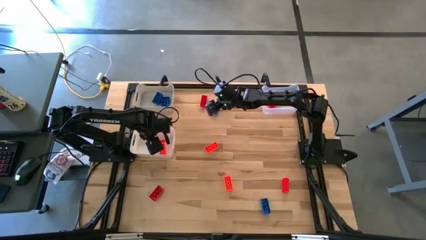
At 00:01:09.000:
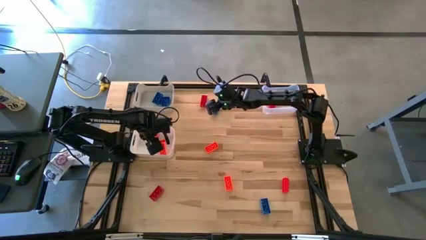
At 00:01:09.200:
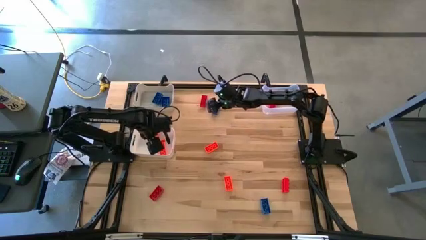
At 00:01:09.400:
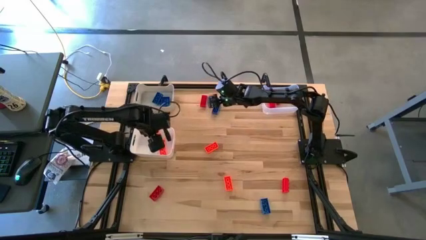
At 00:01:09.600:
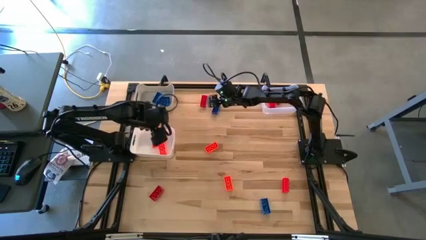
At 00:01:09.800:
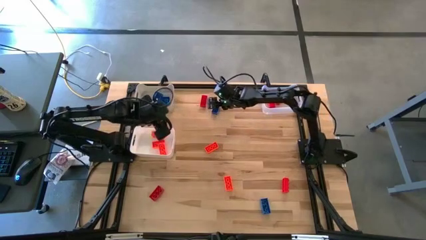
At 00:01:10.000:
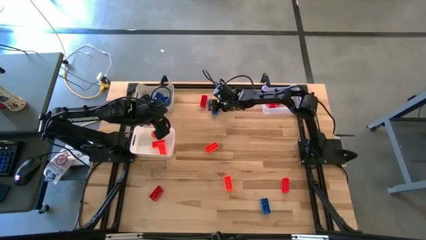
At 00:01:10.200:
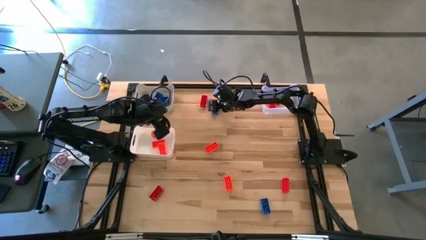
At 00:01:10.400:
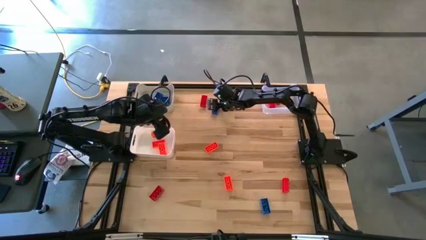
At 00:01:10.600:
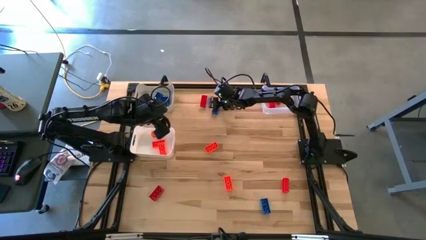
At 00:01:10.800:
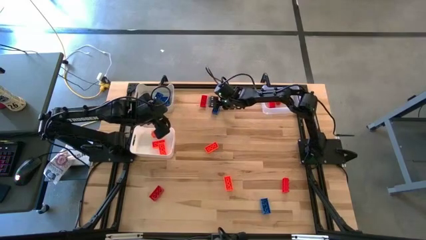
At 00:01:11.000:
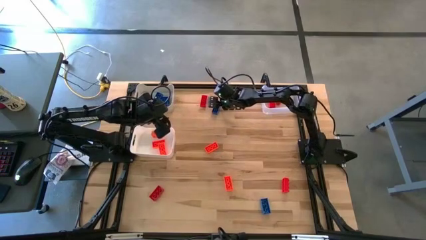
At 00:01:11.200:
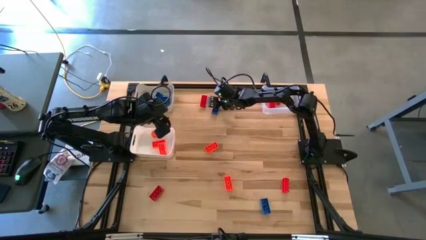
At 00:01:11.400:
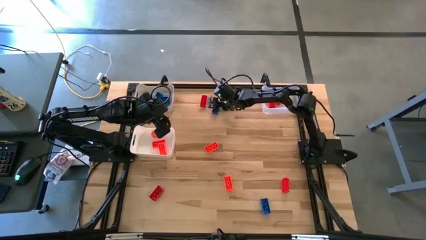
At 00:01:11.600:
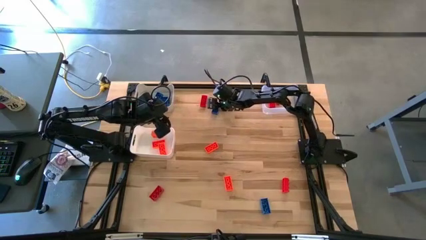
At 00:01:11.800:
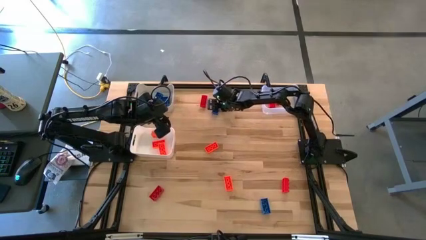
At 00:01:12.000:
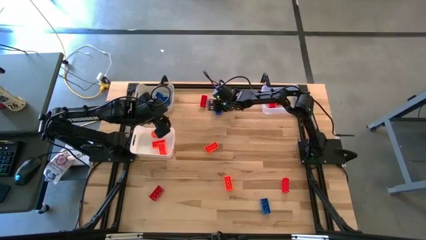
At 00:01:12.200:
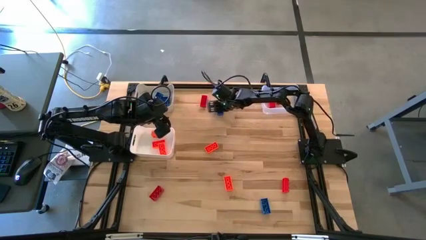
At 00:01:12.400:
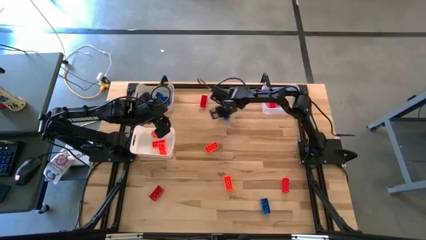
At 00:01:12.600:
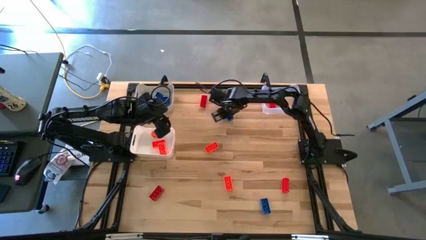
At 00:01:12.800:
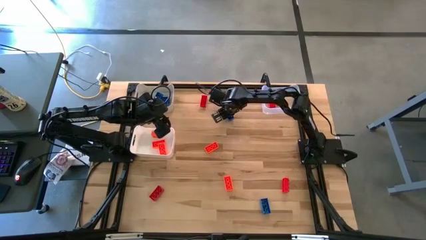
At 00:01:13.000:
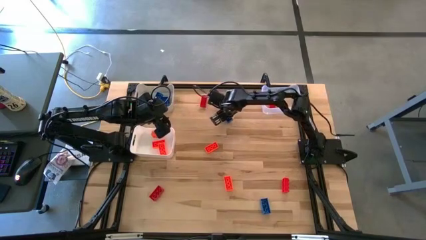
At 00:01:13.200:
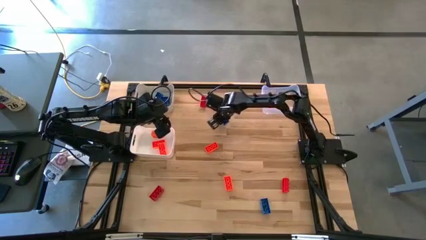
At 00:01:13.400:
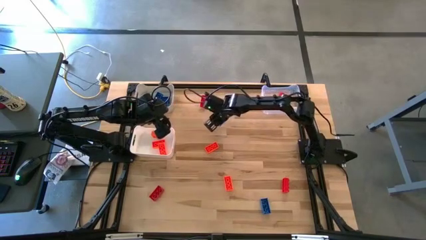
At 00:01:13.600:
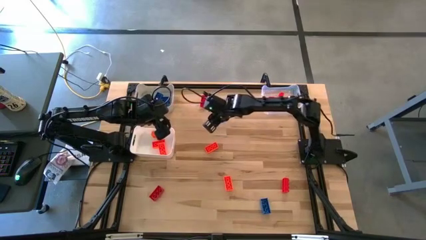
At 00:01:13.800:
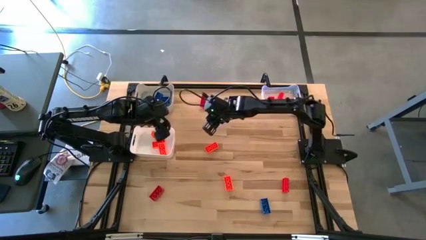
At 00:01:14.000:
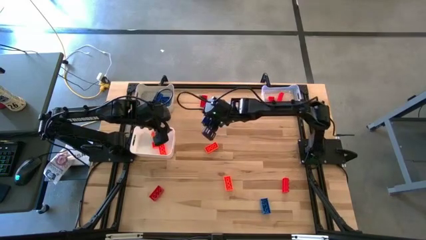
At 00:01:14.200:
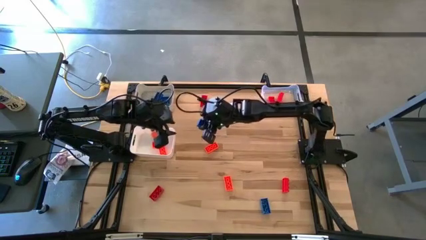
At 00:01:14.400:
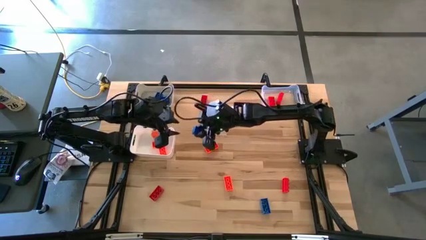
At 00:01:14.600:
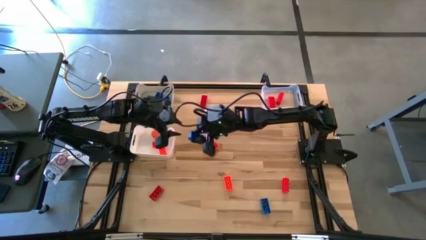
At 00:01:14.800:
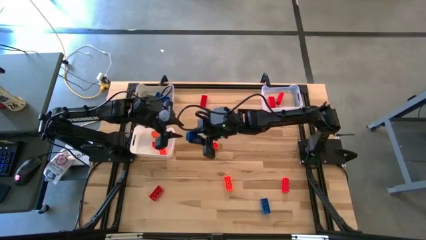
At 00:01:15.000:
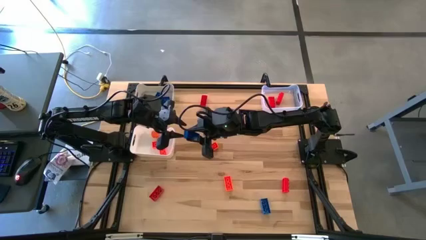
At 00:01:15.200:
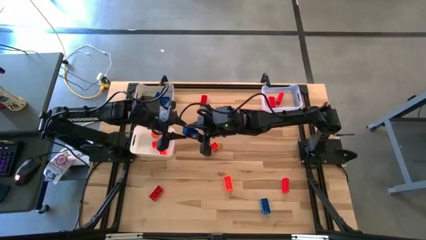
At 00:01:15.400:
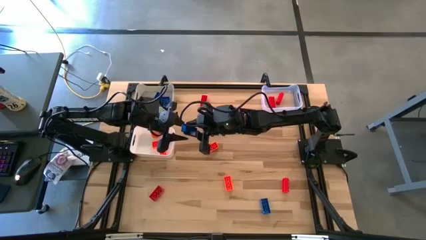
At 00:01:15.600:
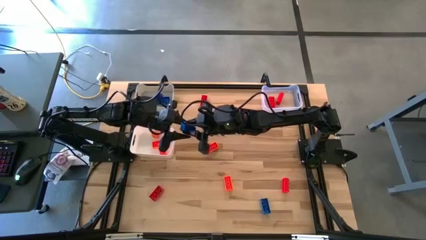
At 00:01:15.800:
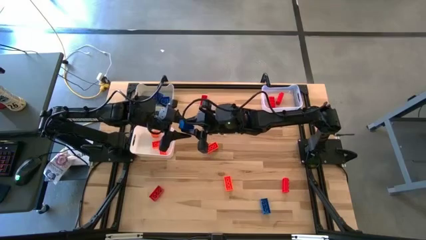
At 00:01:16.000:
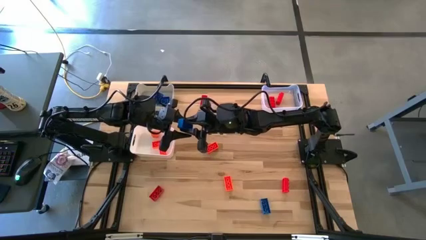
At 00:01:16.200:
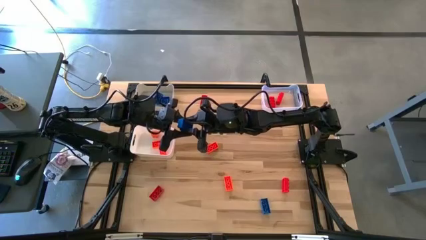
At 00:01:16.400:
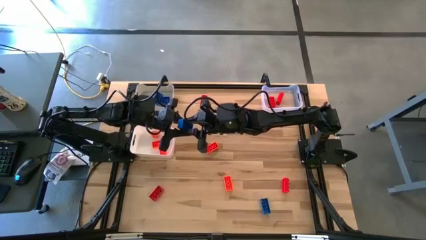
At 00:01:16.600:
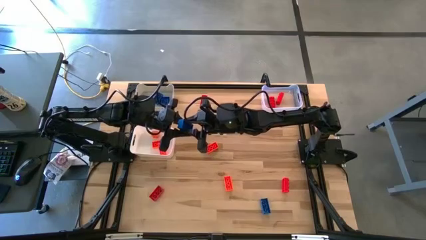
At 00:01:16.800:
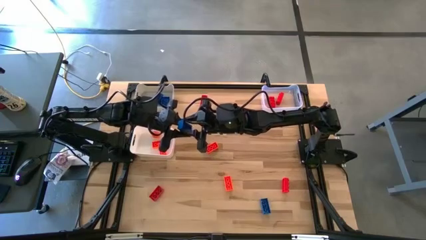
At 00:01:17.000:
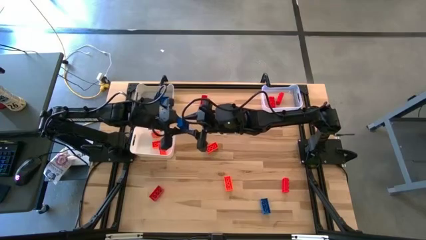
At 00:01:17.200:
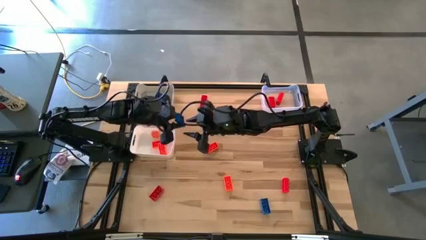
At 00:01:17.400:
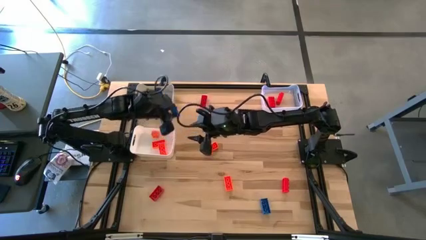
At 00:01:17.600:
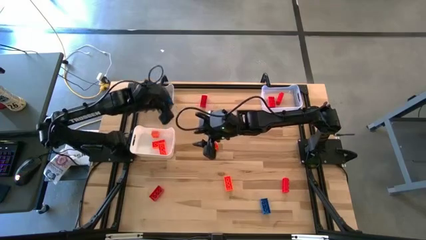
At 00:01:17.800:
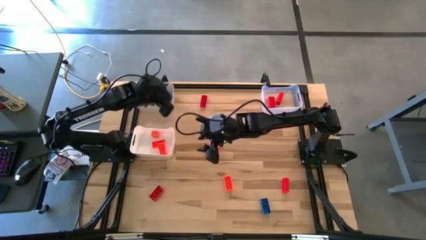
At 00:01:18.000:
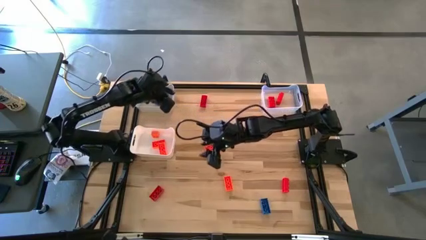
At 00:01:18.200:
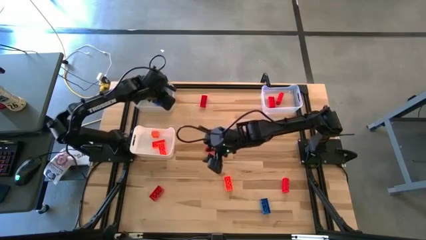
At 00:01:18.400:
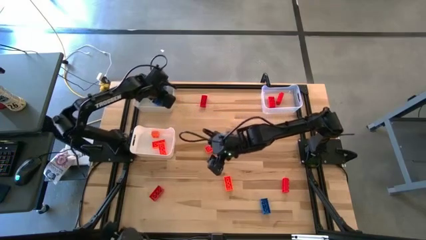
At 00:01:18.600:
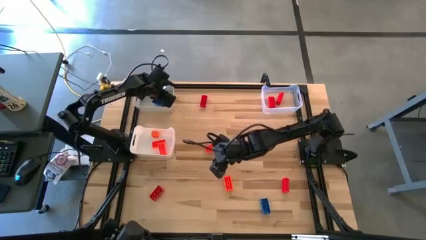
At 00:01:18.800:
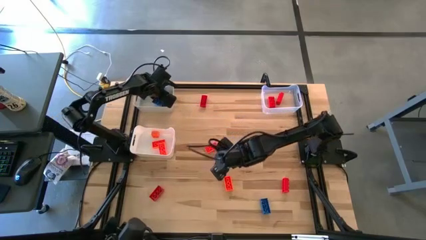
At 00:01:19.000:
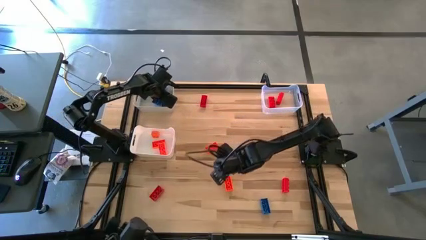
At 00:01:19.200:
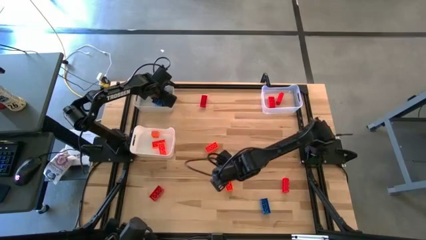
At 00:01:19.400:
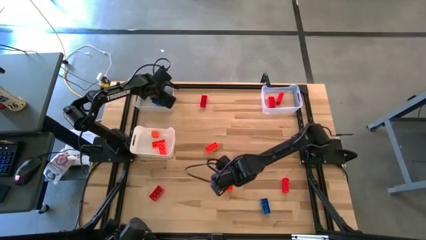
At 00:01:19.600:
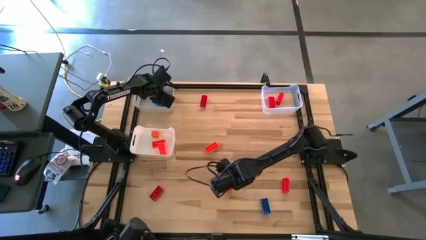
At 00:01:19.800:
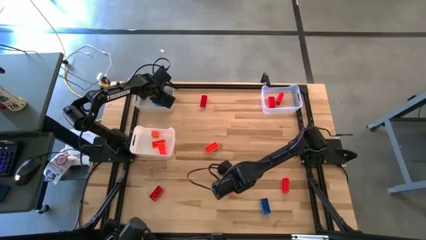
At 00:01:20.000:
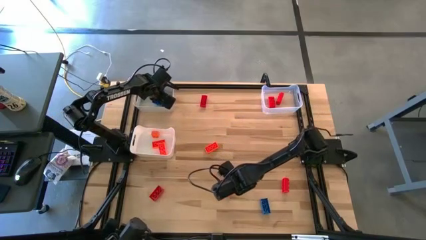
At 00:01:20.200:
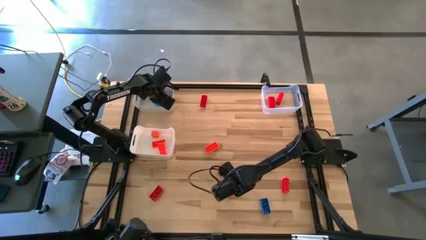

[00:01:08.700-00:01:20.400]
Task: Sort & place blocks by color
Put the blue game piece into the gray bin

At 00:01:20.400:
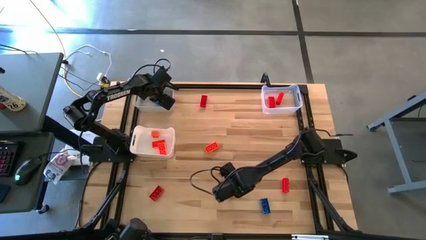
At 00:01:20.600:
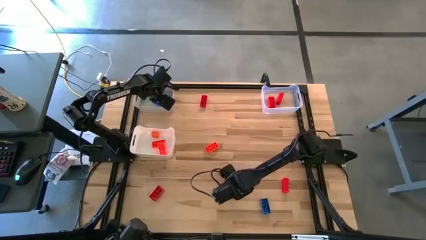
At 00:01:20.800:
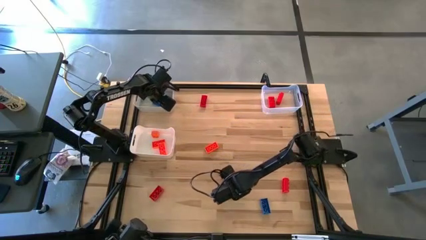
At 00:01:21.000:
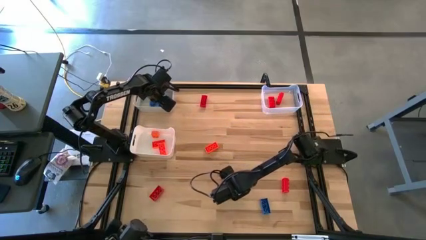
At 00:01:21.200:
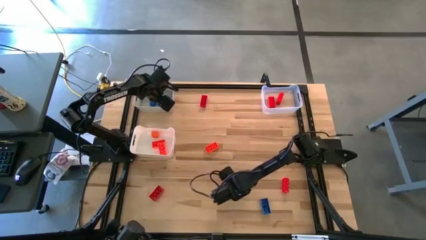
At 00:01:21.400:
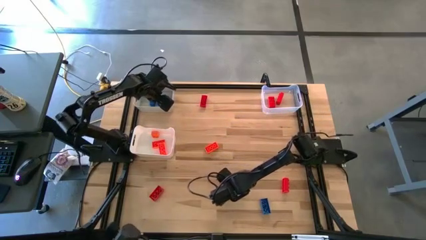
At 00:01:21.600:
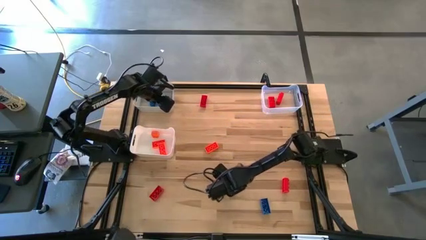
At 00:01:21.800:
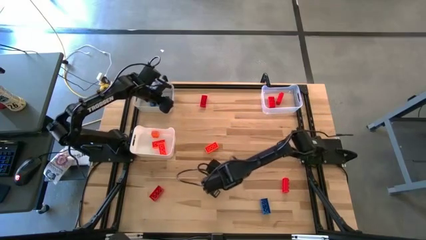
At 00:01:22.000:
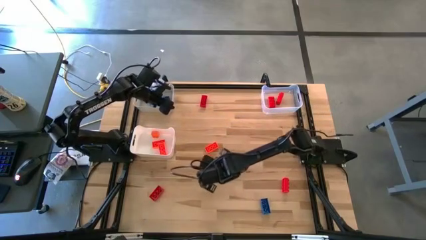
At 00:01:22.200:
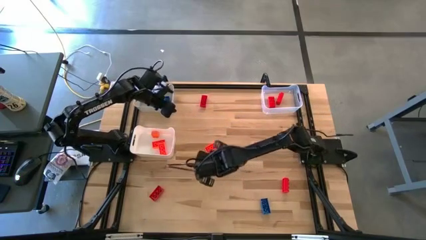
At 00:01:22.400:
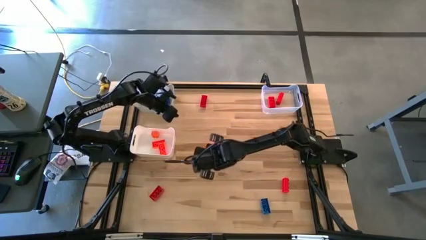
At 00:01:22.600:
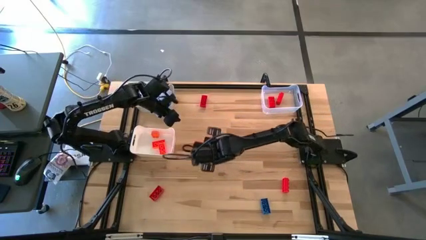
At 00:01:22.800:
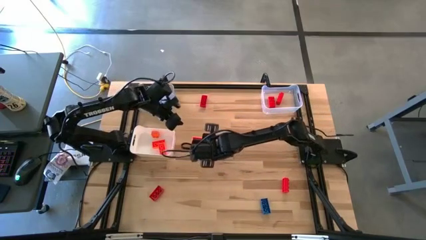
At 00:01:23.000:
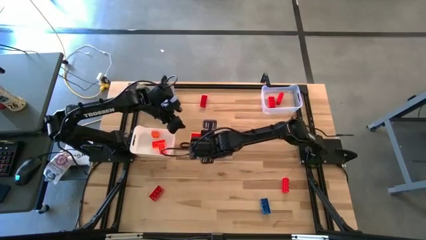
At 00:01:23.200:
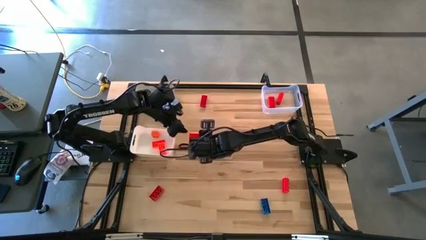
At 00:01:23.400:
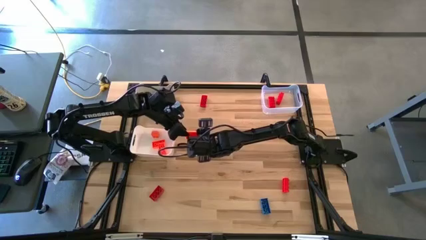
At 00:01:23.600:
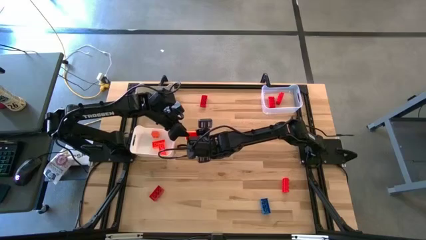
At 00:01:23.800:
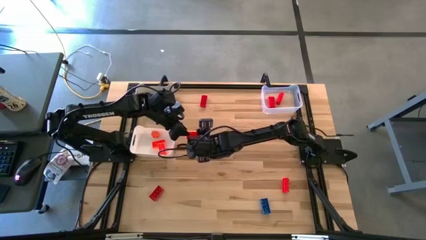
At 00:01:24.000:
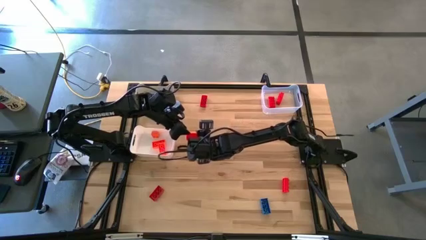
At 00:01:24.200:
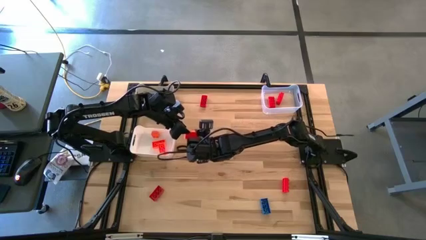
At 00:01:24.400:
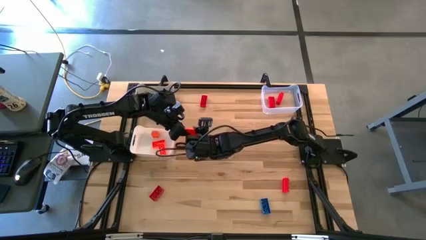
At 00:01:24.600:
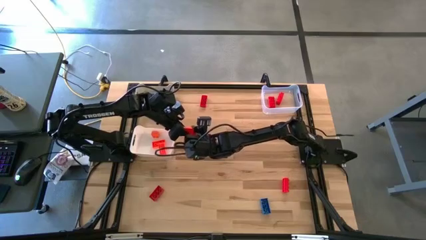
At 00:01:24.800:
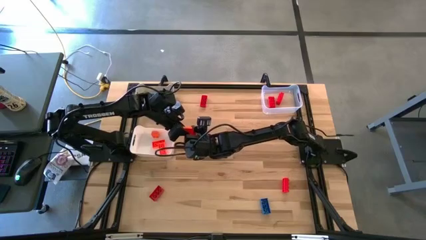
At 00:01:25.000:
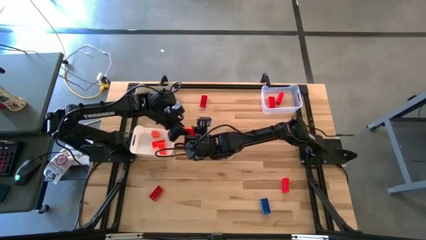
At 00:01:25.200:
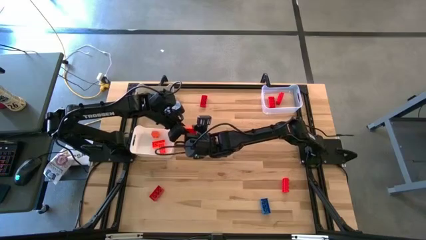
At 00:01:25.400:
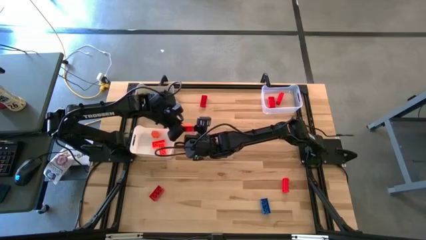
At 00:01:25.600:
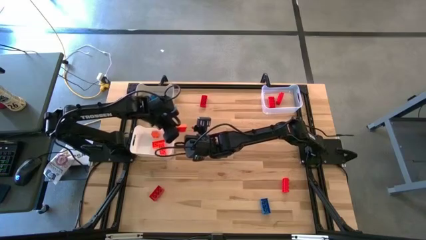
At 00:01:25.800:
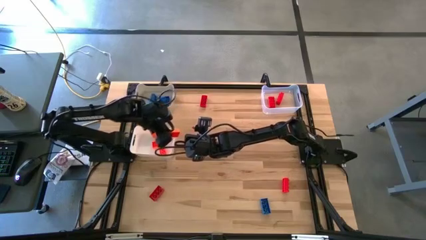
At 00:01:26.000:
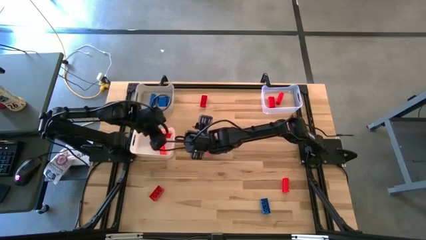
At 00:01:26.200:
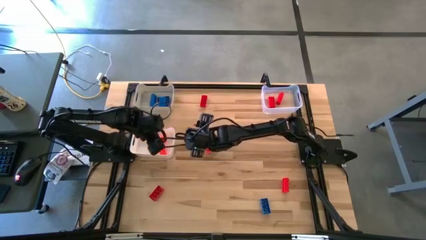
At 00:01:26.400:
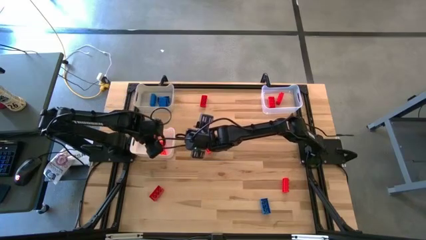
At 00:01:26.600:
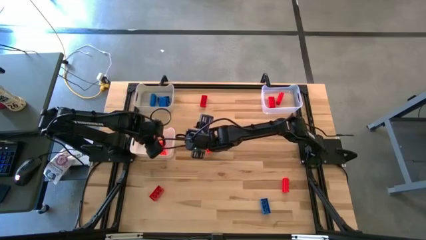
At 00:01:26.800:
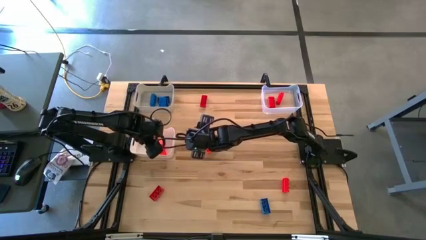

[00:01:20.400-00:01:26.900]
Put the orange game piece into the white bin
